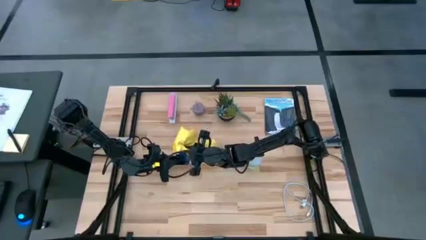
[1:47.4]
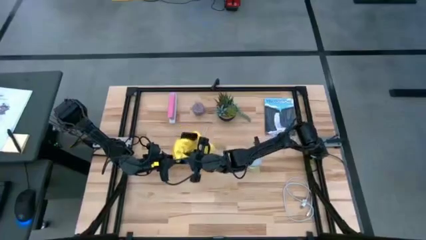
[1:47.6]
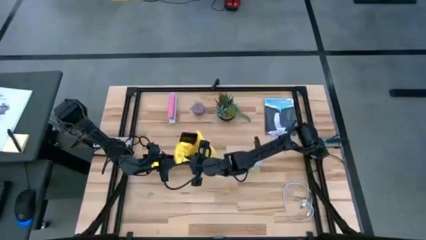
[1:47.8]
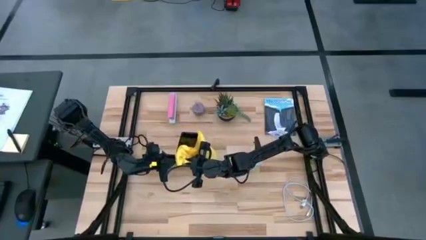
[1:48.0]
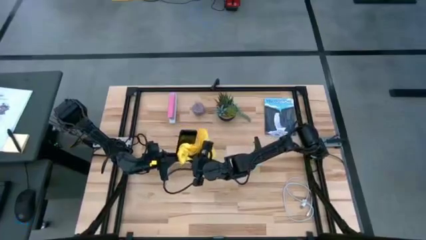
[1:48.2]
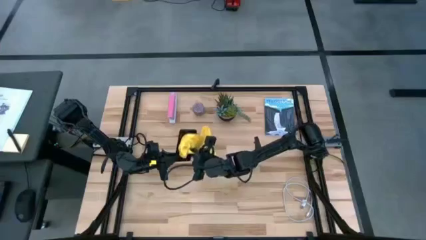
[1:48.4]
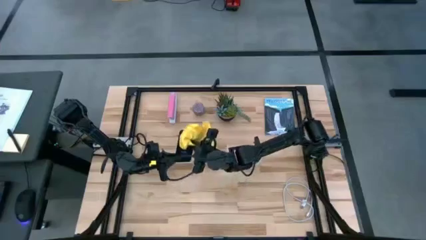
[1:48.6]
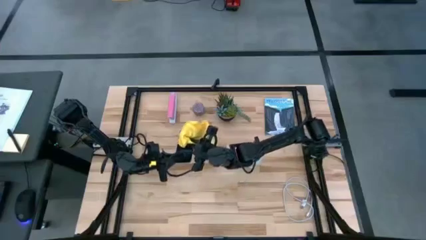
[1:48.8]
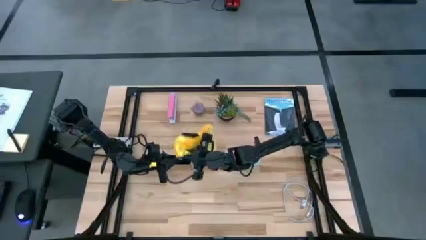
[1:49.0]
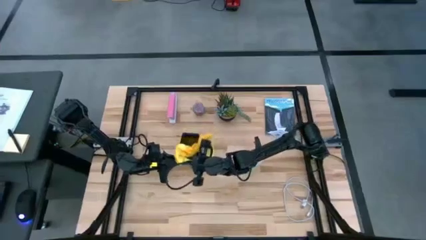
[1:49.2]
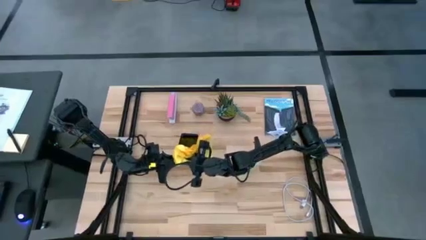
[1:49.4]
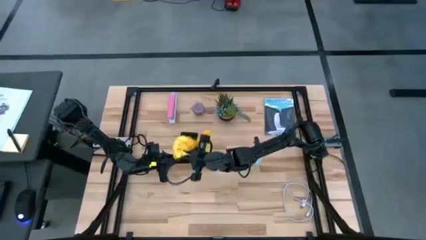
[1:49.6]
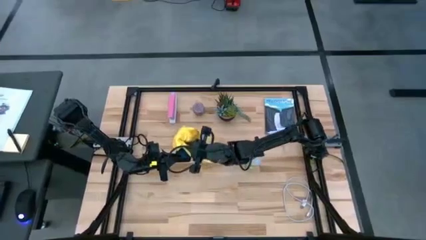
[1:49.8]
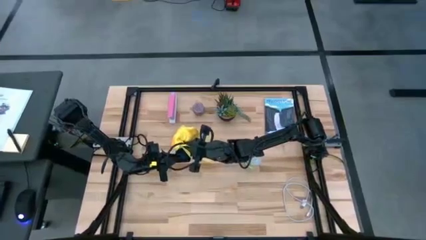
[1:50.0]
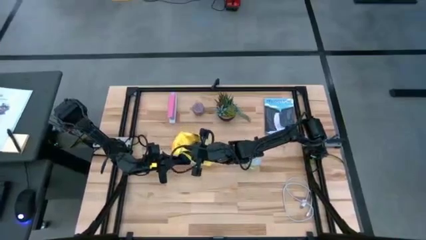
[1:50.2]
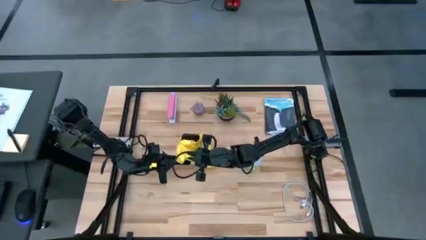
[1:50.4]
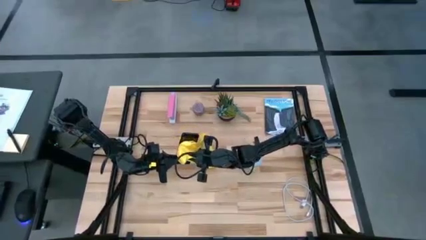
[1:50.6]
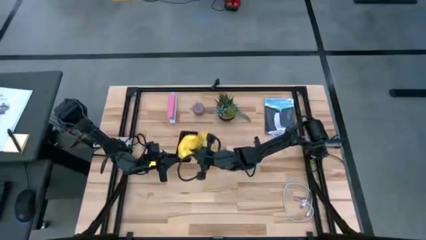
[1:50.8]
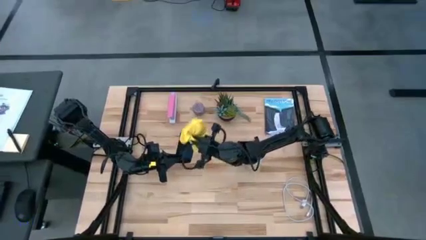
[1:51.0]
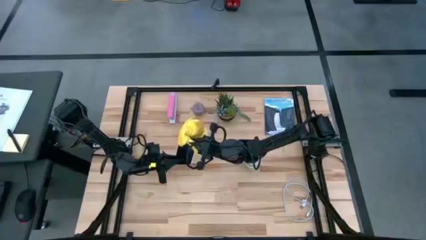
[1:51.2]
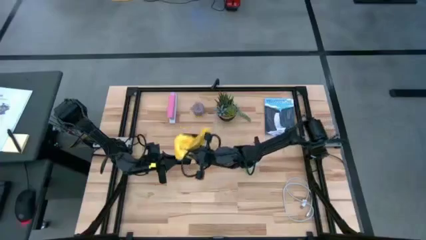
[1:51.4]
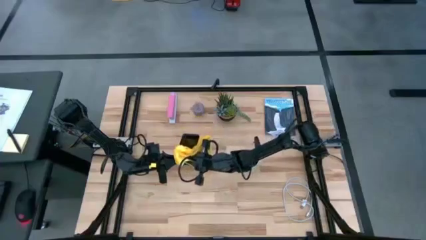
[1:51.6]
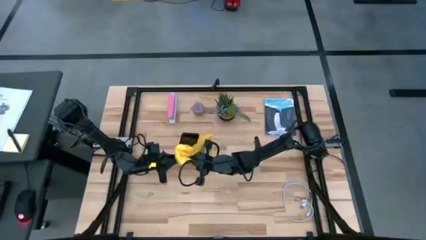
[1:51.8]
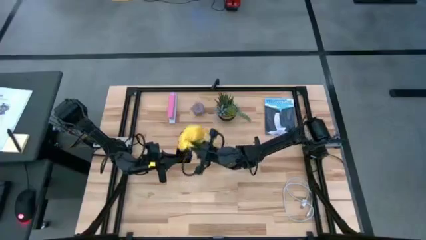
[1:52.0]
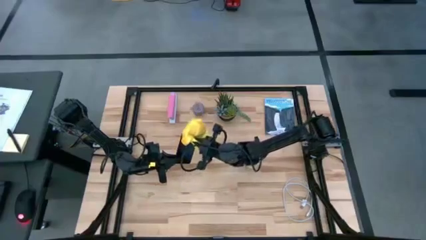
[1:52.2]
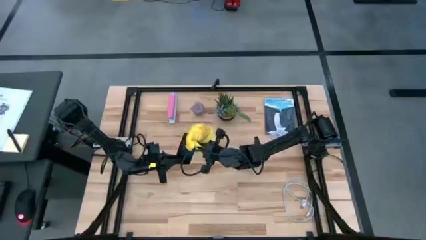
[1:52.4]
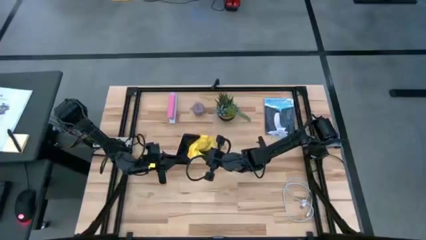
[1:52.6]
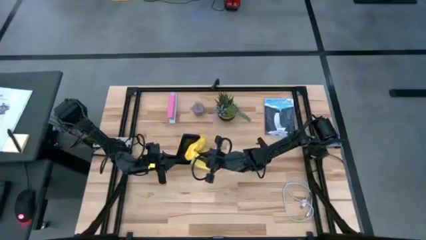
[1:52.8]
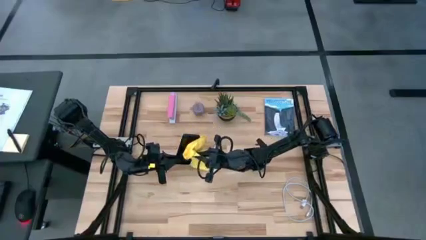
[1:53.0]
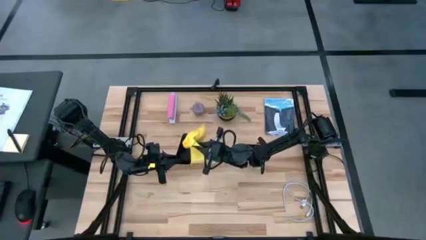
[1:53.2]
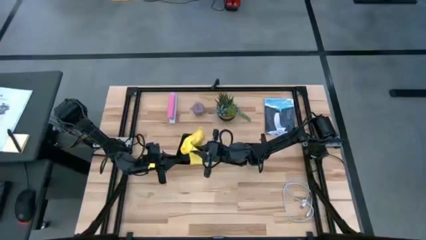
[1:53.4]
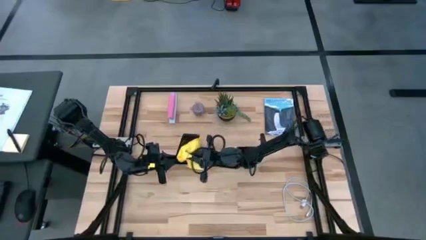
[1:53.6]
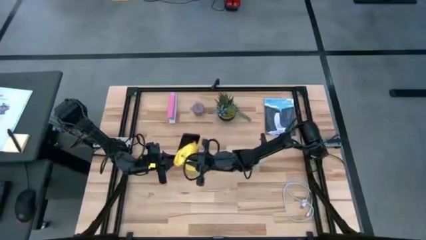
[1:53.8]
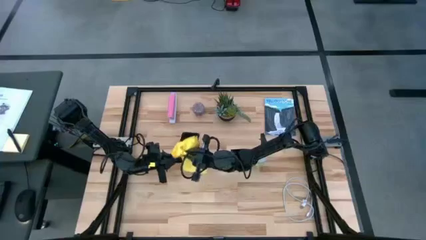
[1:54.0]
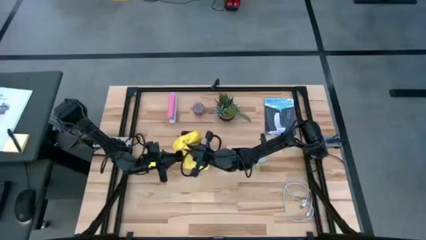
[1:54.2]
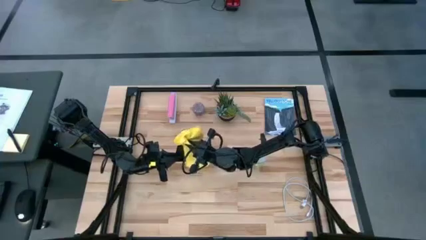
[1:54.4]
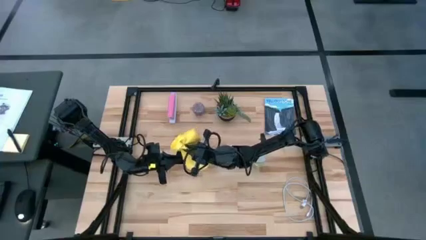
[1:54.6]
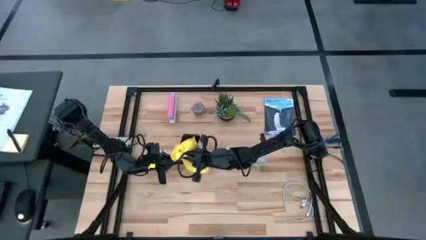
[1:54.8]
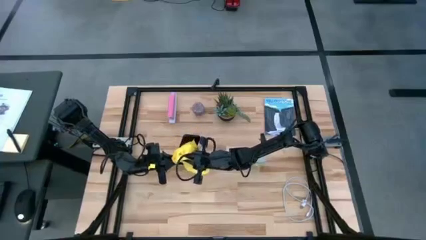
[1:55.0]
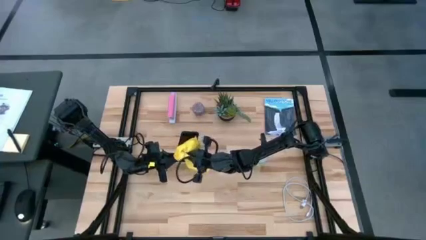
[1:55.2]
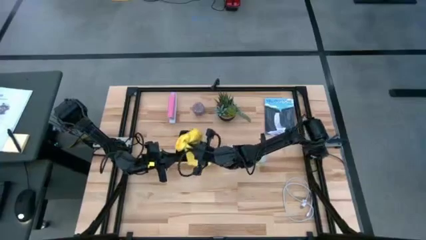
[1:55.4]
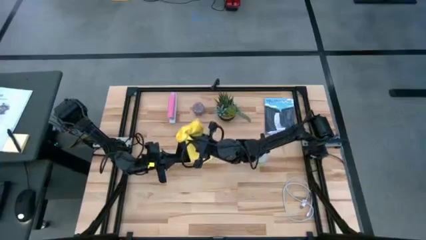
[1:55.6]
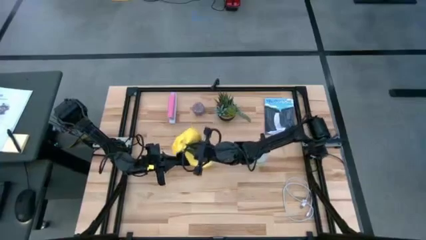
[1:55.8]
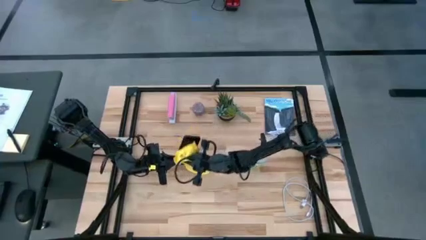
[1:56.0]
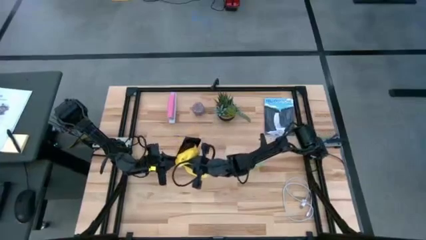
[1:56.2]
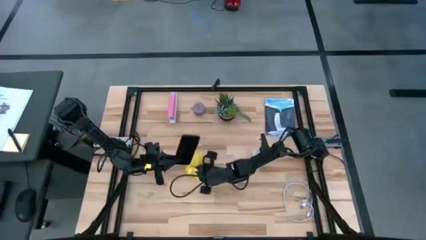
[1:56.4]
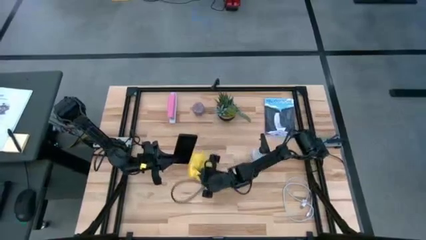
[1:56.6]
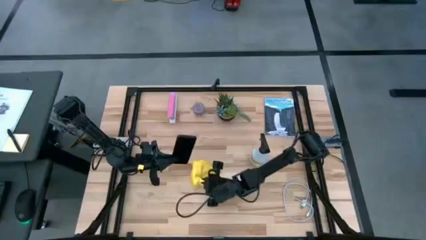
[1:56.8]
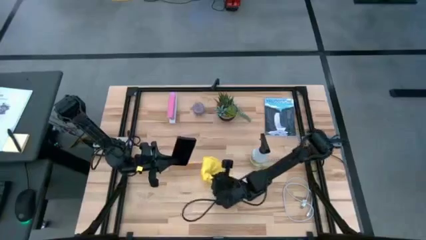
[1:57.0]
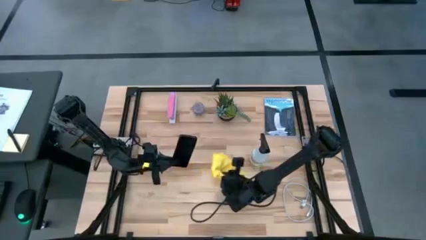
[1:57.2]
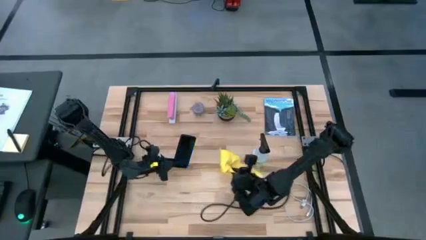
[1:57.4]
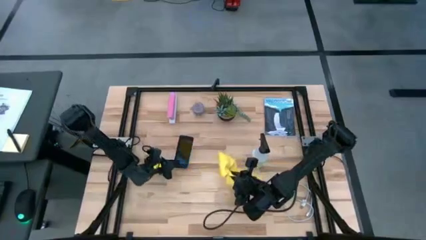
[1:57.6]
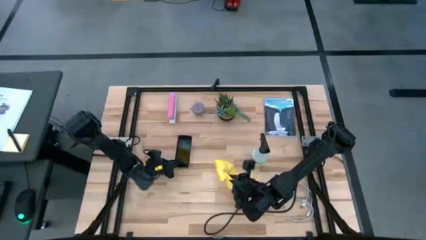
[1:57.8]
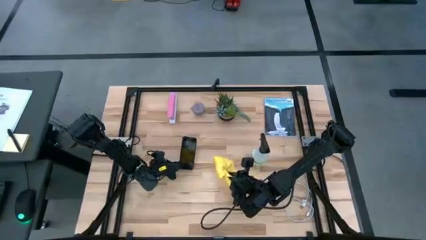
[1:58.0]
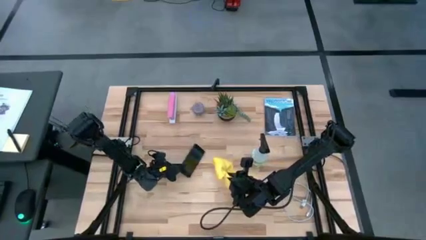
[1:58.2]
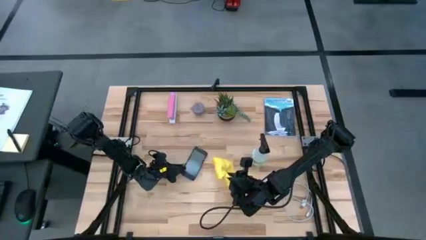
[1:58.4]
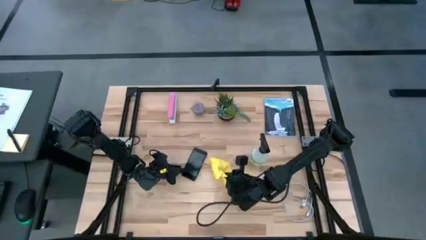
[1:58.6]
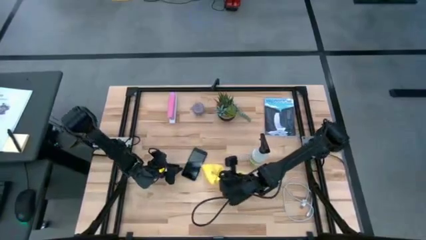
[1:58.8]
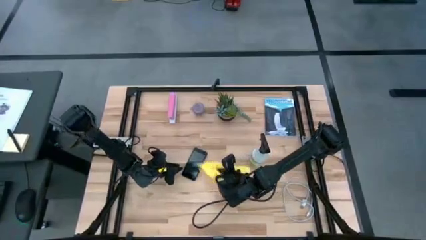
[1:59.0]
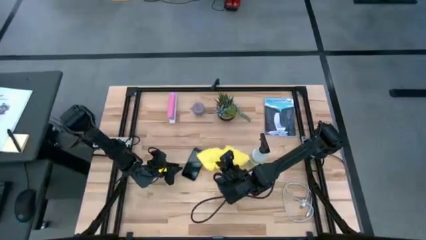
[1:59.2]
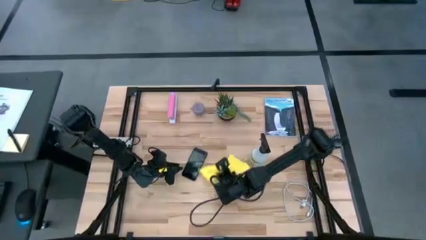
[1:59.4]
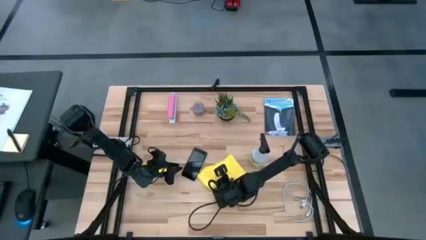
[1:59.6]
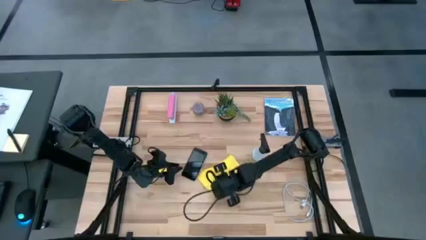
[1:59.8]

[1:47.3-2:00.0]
Task: Apply microfiber cloth
Wipe the front of the cellphone with the yellow microfiber cloth

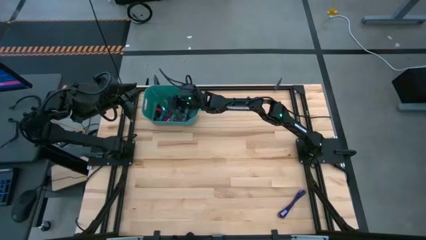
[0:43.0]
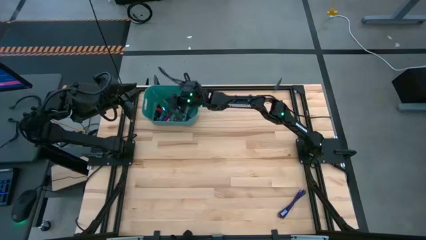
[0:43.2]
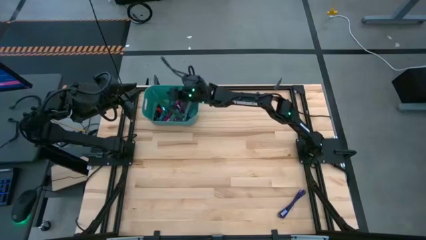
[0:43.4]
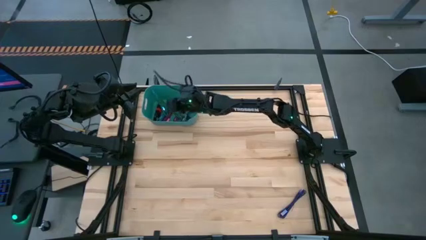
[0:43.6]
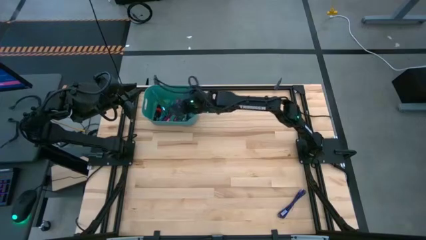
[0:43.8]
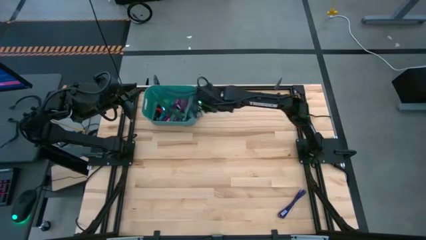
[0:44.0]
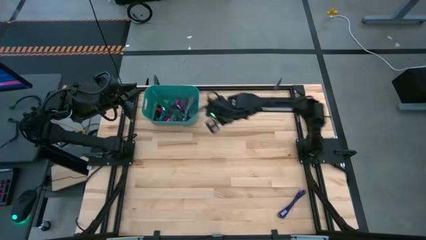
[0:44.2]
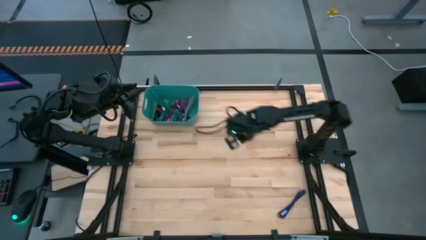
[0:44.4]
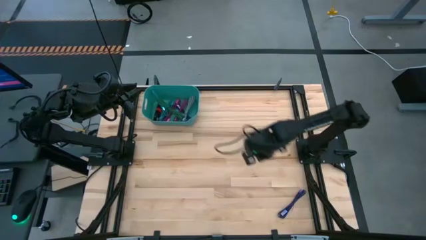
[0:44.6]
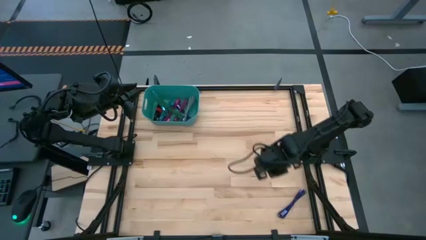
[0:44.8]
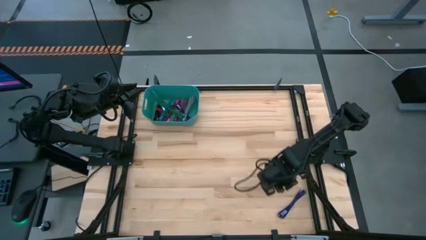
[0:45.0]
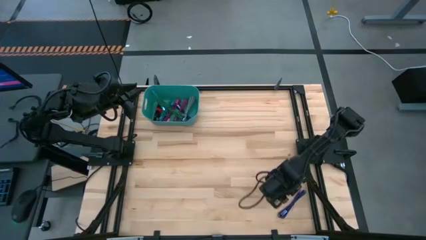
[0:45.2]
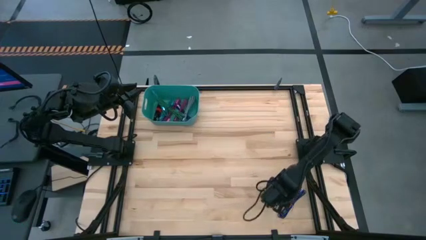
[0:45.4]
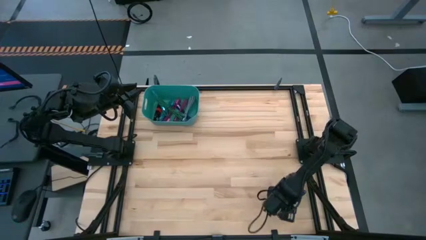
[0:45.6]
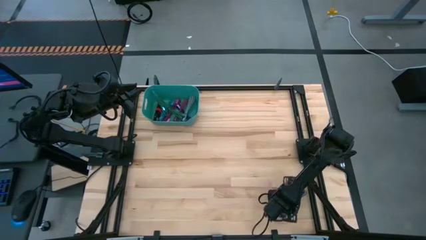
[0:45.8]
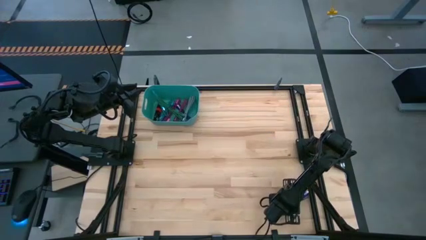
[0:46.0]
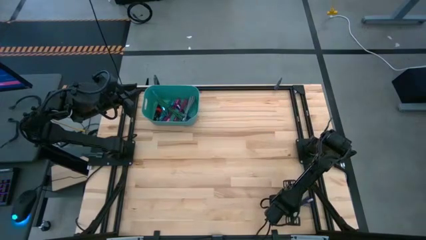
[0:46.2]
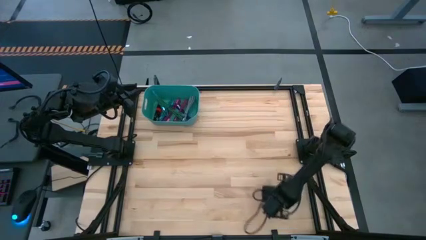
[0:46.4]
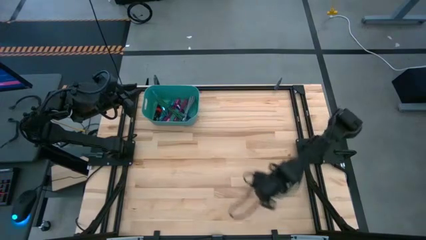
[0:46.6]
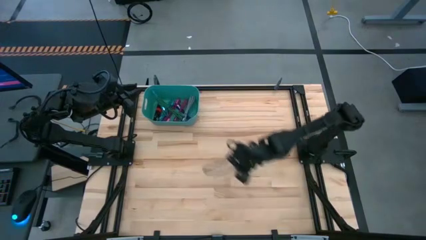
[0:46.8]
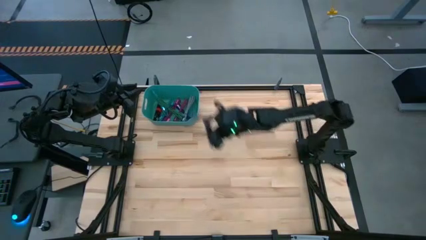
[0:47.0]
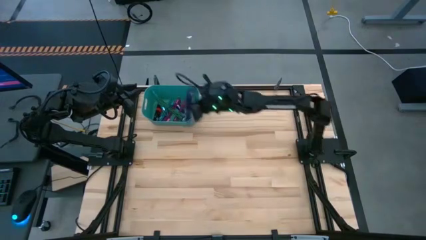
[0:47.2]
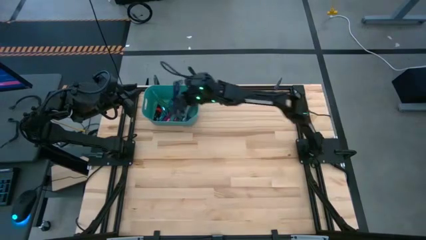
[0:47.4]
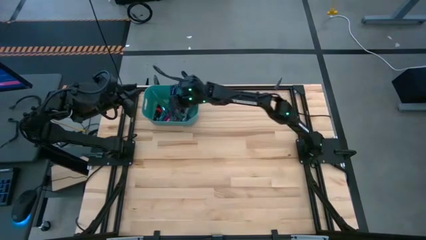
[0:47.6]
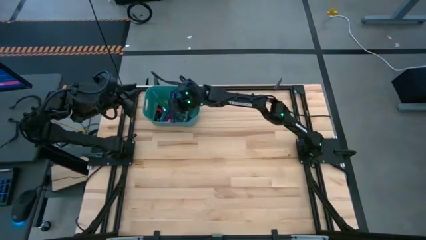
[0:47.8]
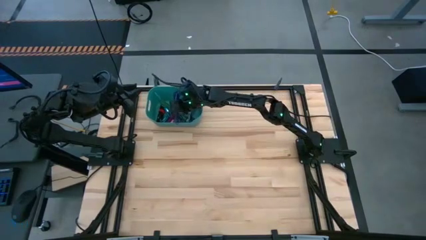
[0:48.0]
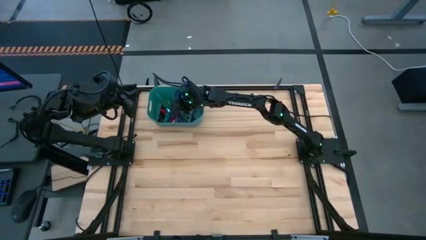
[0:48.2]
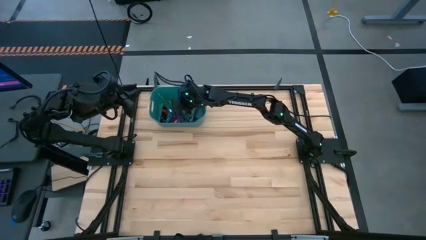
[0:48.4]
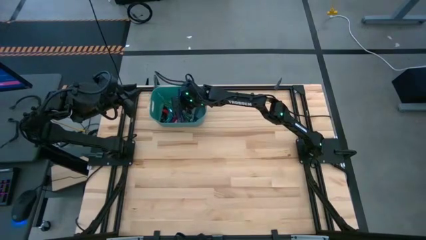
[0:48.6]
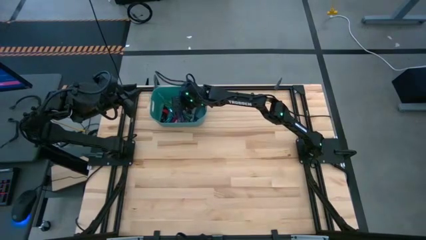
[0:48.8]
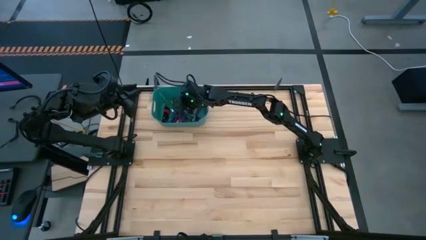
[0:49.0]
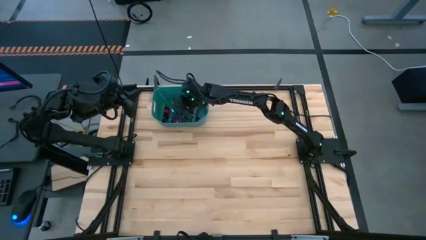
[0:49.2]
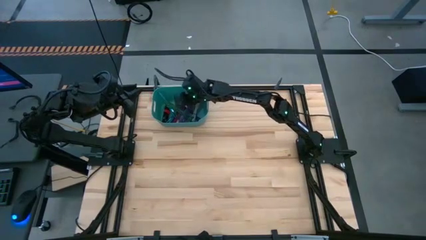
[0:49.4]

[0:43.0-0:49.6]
Task: Pick and place USB-C Cables
Put the purple USB charger cable into the green bin
